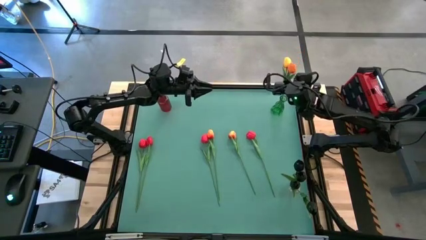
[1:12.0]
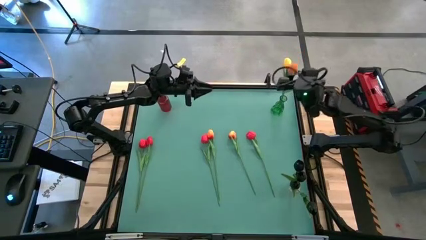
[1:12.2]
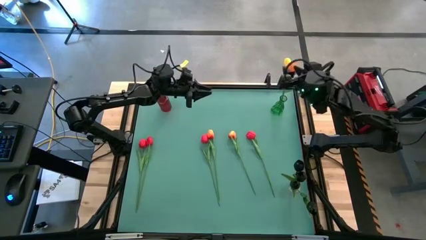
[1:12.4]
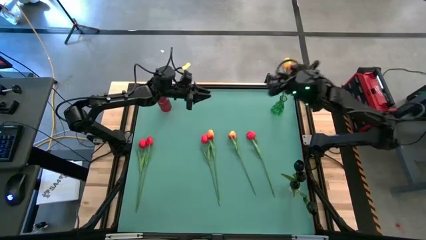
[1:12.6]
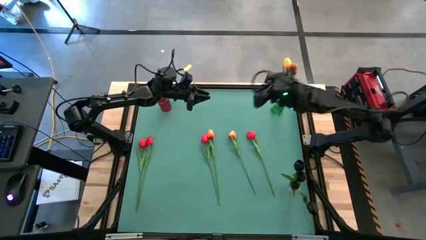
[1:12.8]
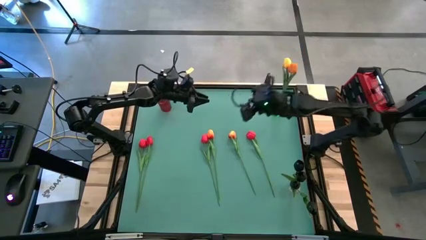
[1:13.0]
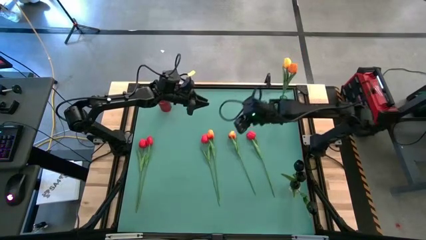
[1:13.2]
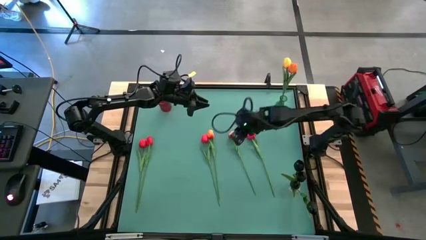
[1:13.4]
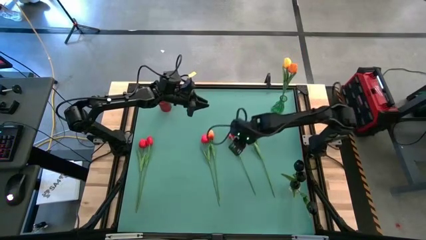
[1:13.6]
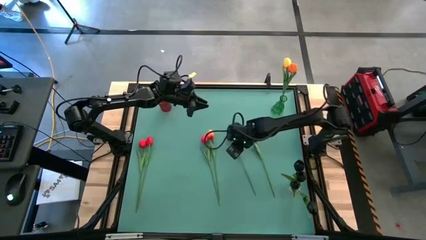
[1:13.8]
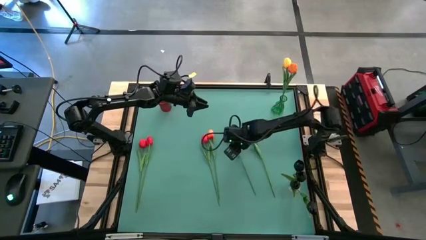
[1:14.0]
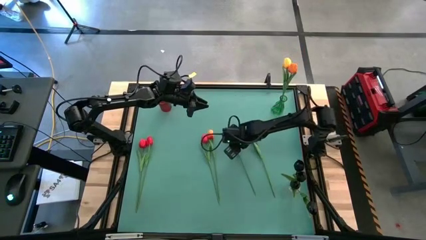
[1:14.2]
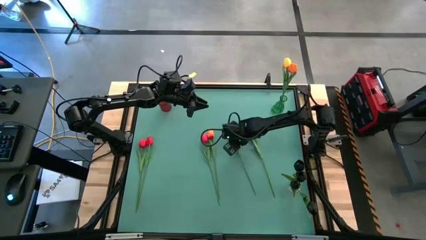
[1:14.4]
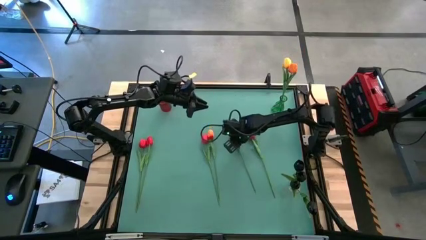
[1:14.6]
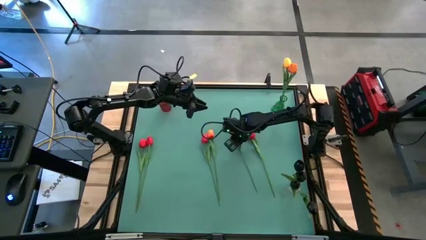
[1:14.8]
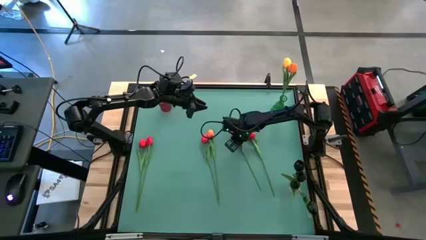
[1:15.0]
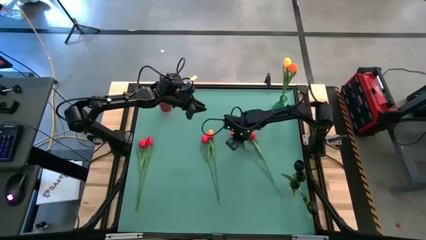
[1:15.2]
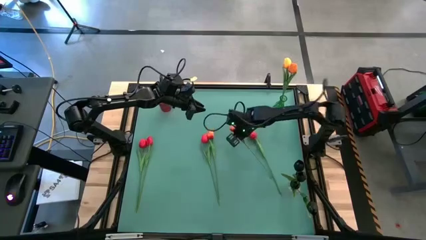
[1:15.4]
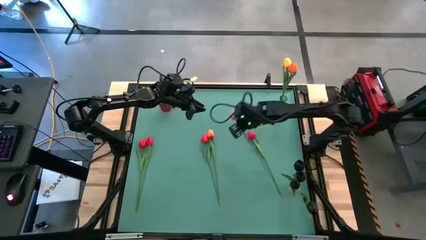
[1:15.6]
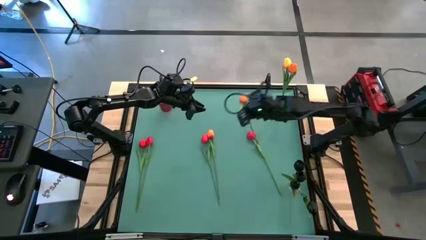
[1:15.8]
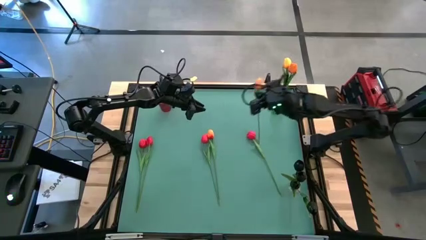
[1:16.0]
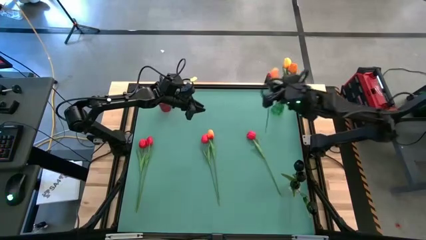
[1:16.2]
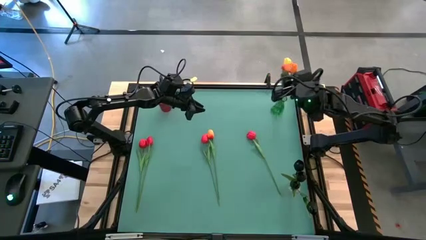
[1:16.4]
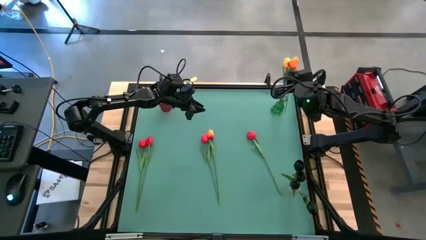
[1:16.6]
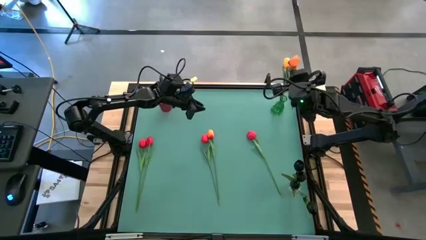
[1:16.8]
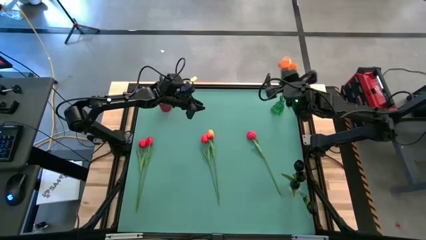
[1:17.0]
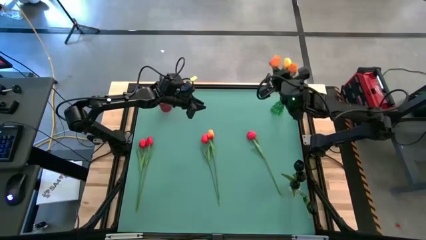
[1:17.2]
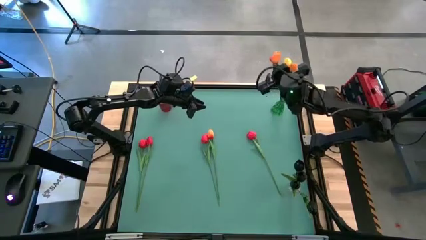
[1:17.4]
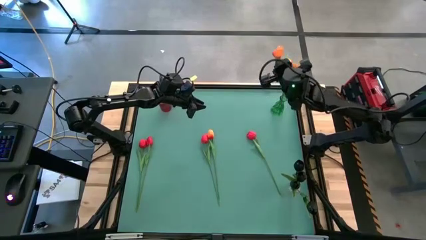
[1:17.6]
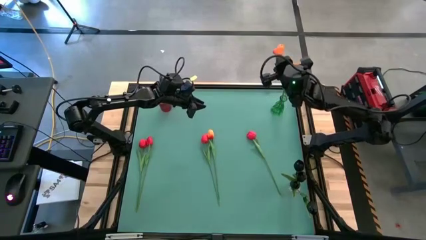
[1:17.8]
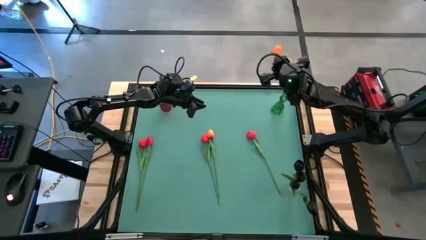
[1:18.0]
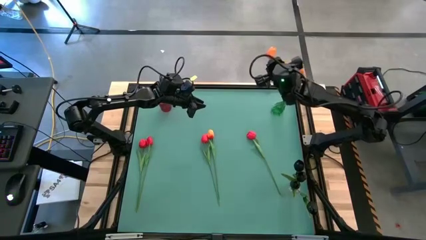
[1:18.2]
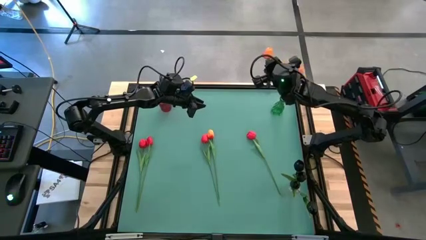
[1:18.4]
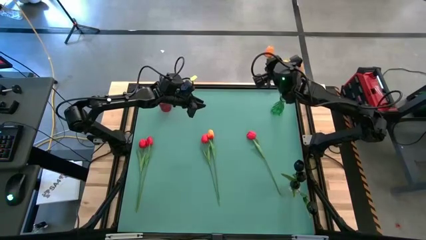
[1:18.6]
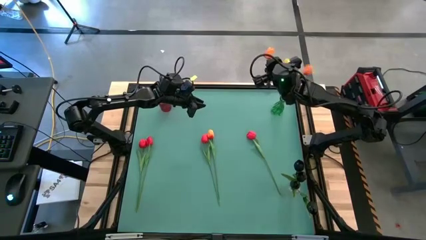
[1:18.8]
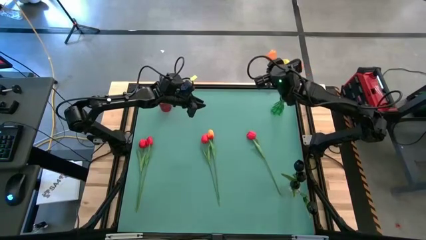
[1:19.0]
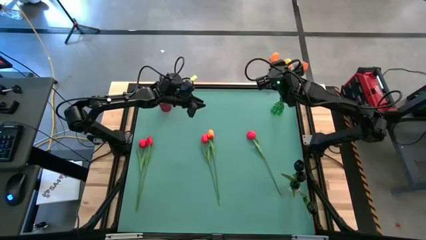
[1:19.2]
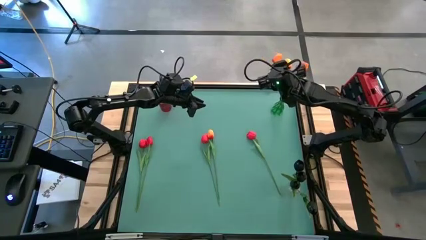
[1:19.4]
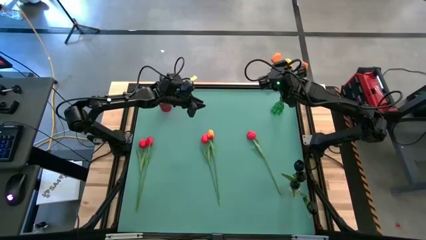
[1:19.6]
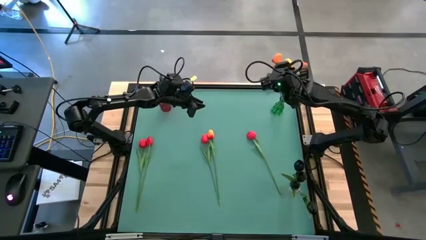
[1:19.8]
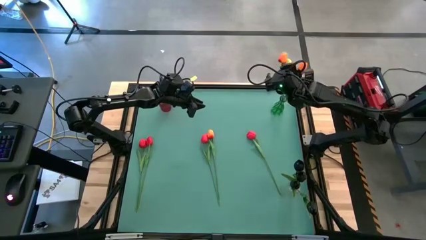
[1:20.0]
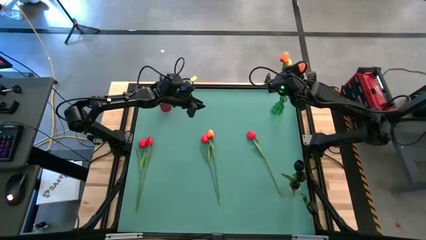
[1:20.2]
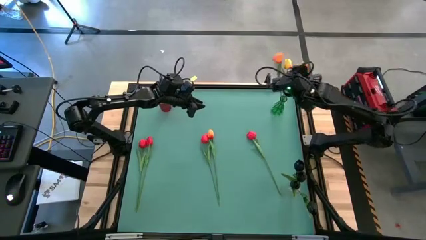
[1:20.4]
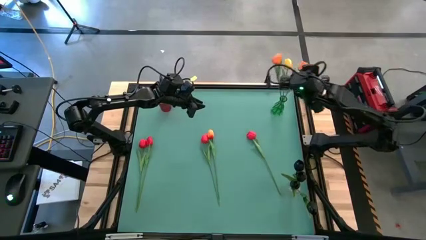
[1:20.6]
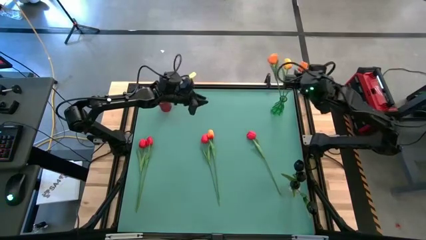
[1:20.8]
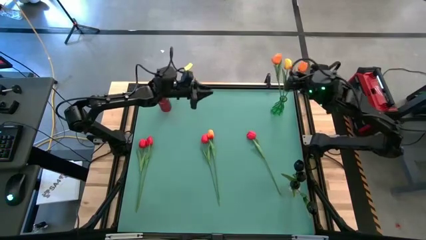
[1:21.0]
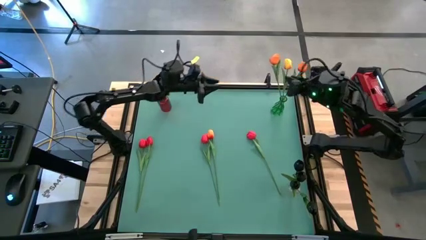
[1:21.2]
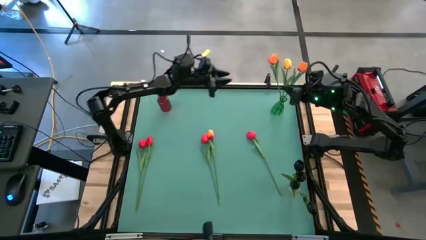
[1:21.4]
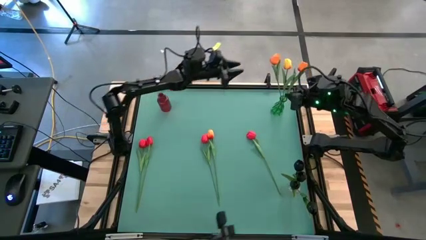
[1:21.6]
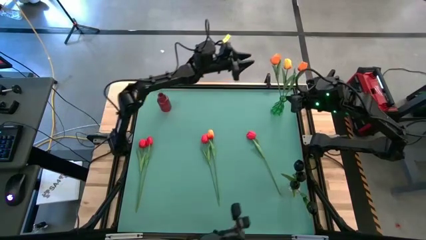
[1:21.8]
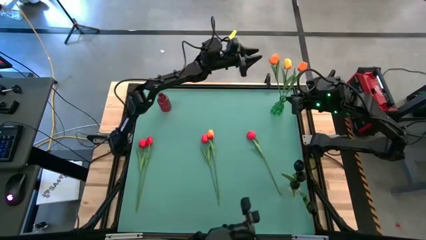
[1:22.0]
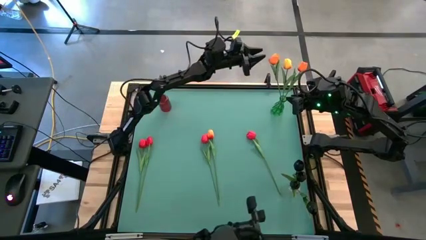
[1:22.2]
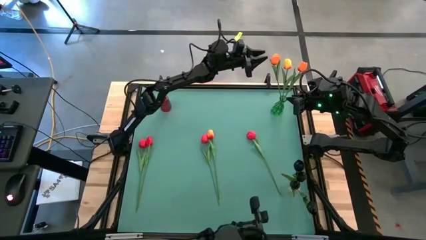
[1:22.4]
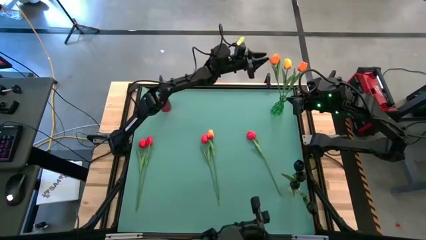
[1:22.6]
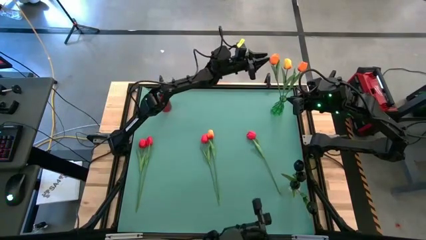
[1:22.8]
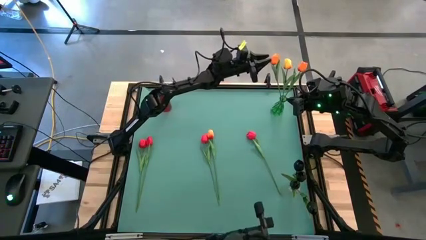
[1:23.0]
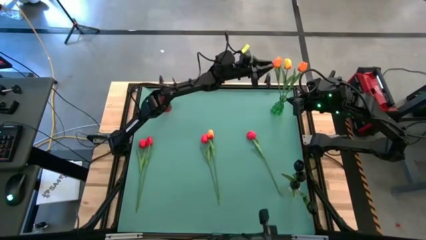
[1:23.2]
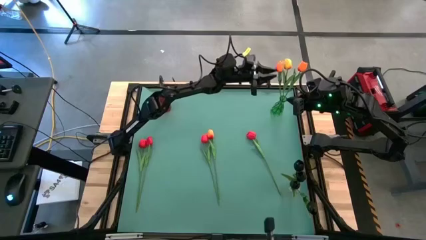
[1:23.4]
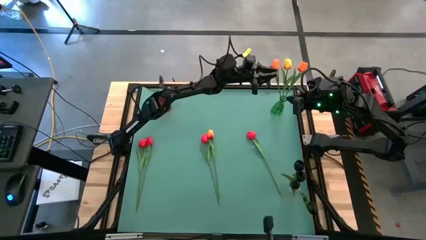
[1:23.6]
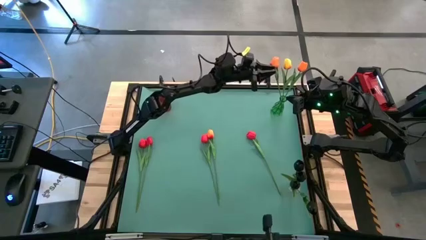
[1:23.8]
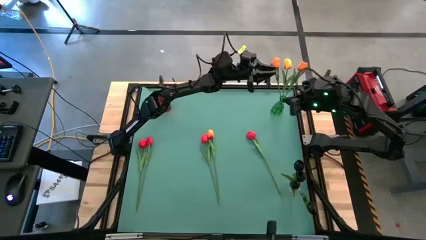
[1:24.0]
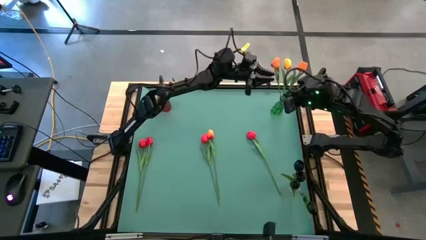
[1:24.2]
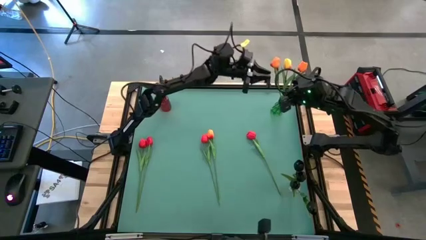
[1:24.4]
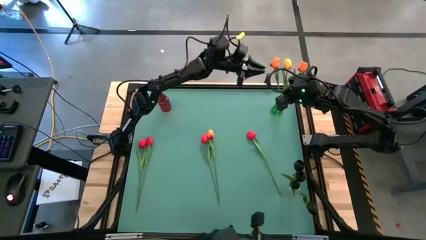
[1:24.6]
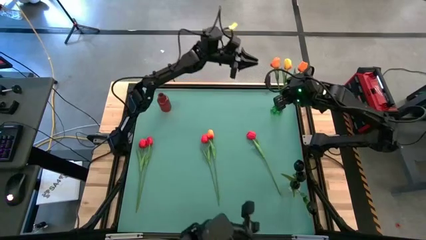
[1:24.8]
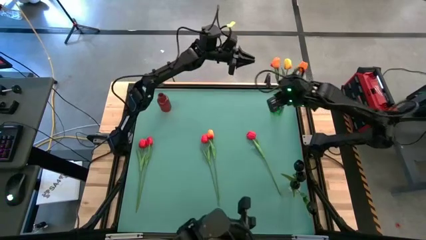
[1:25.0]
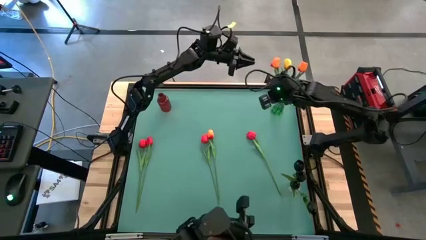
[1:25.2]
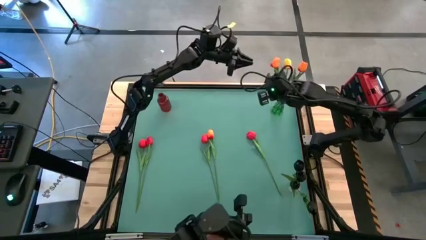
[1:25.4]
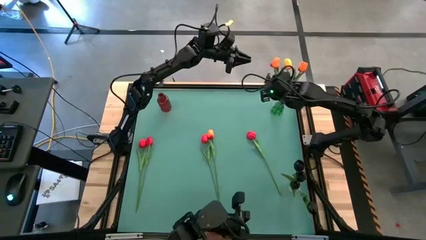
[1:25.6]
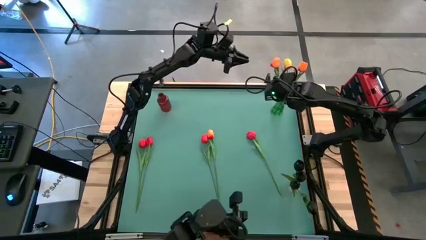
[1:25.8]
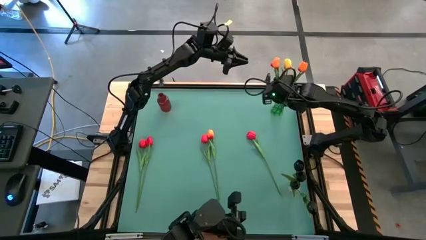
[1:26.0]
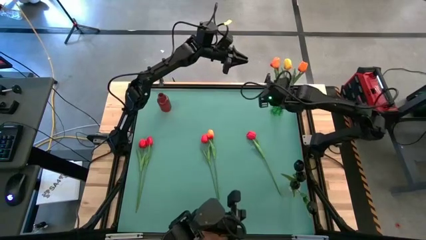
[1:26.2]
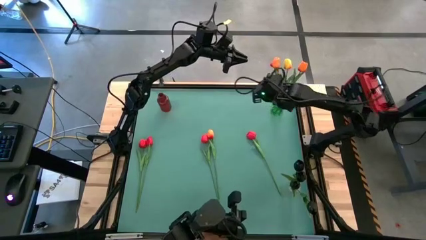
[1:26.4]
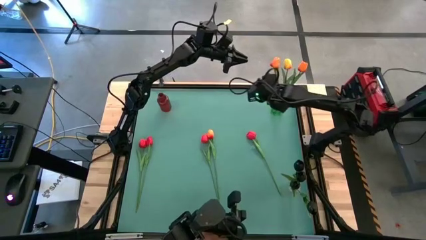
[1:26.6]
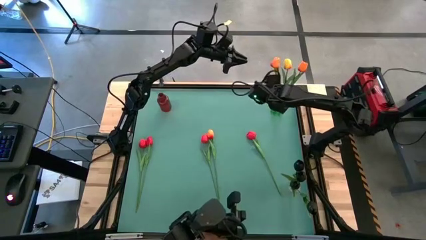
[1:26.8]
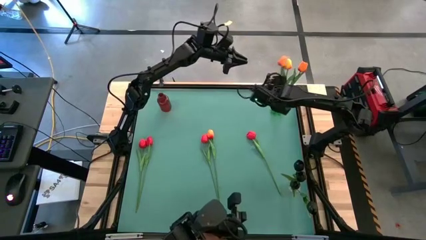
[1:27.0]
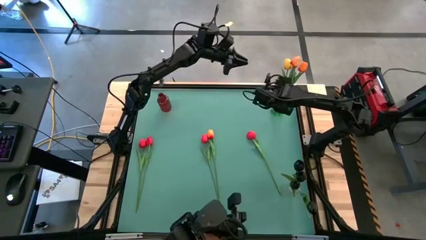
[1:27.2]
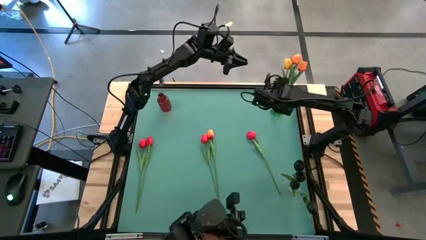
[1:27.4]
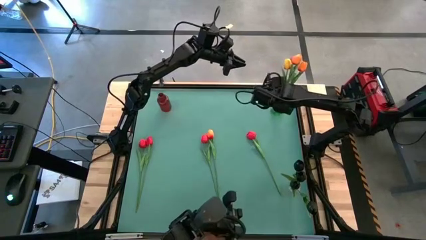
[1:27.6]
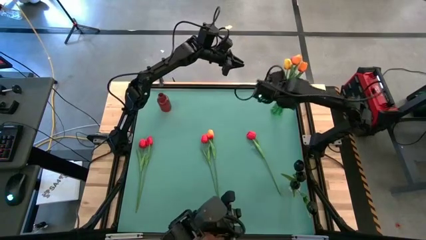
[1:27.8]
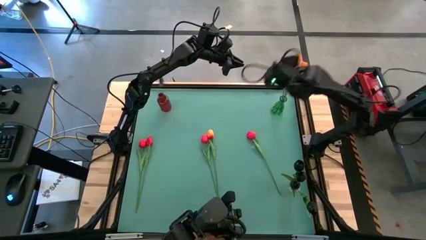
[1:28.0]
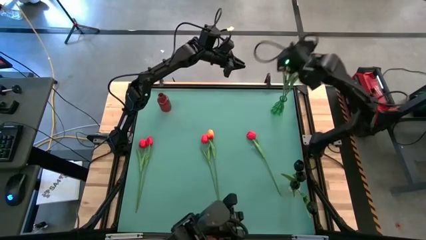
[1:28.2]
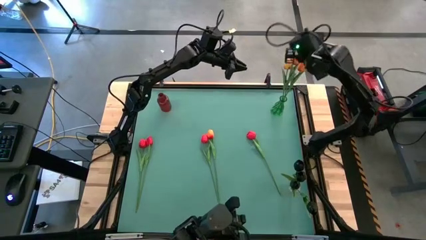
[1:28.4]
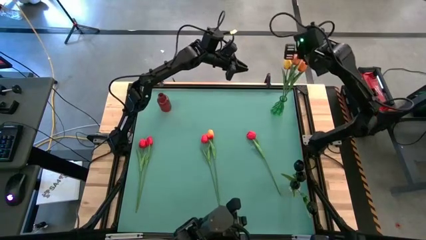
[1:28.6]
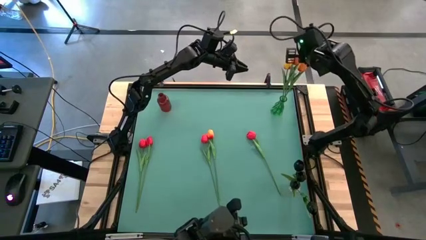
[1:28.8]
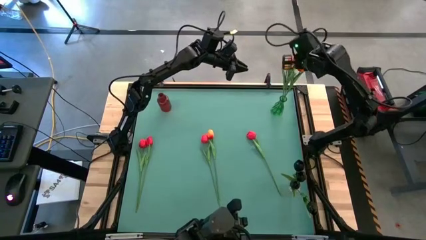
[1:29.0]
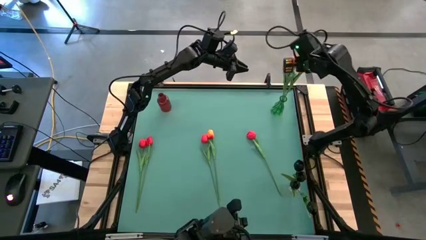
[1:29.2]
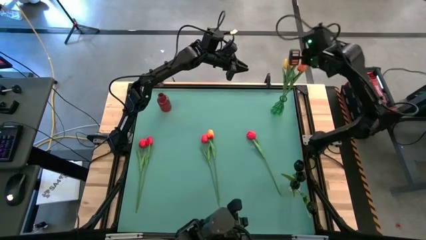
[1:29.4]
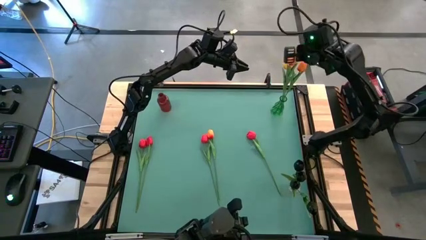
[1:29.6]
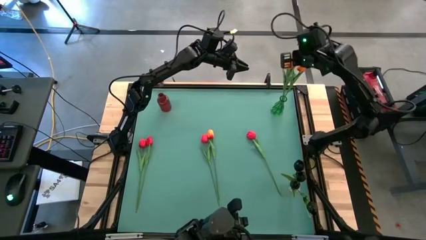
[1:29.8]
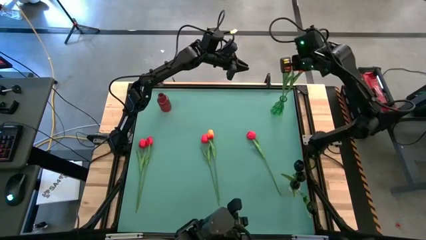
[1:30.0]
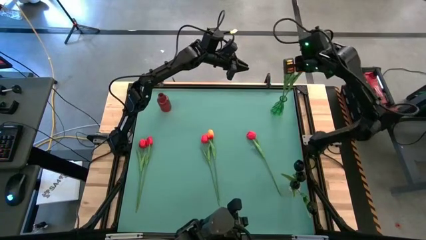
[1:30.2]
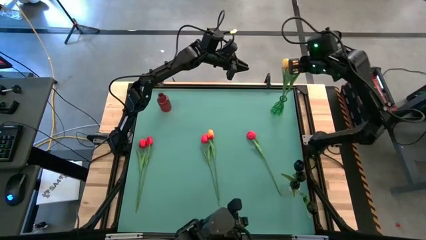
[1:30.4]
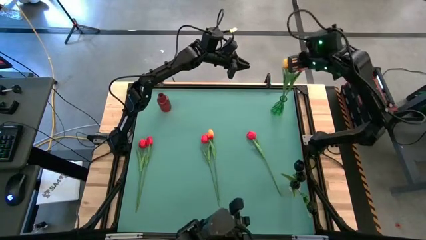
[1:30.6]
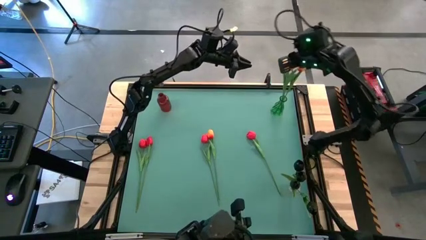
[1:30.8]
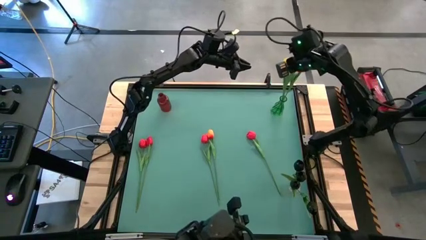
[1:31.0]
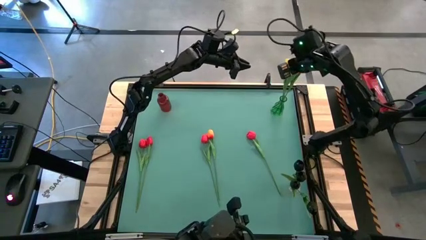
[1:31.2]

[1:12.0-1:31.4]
Task: Sort flowers into vase by color
Put the right orange tulip into the green flower vase
